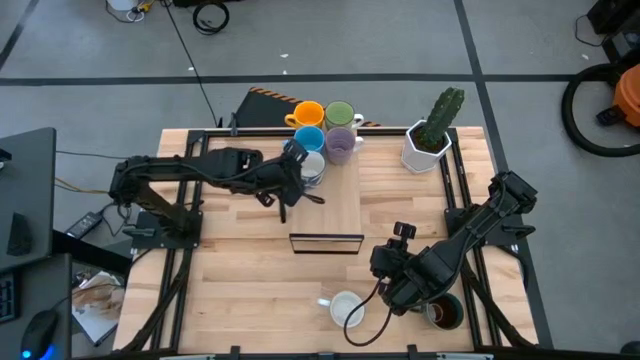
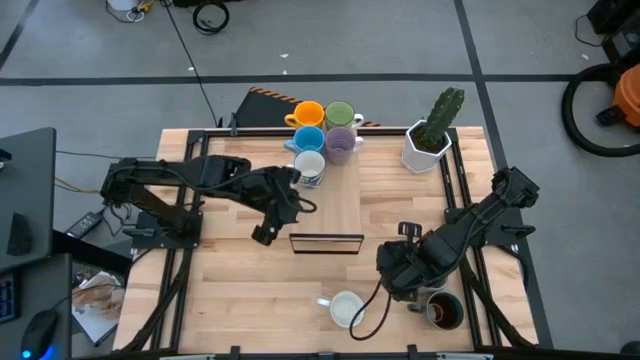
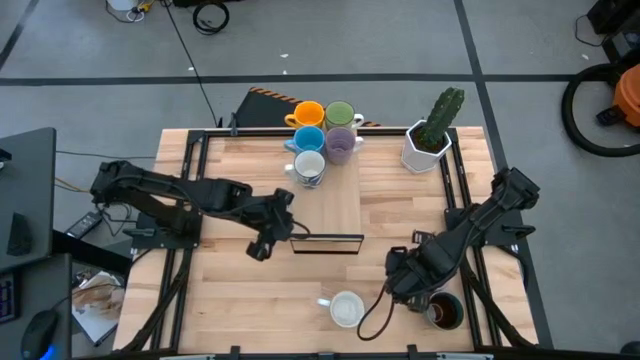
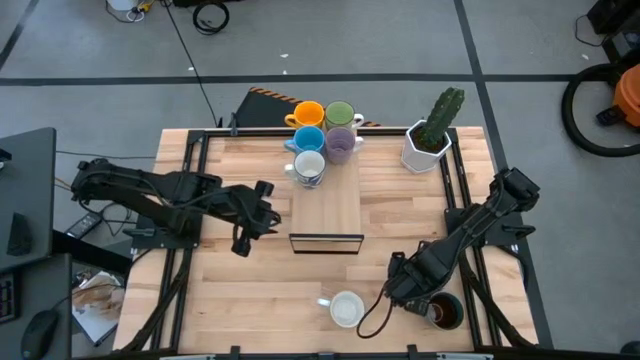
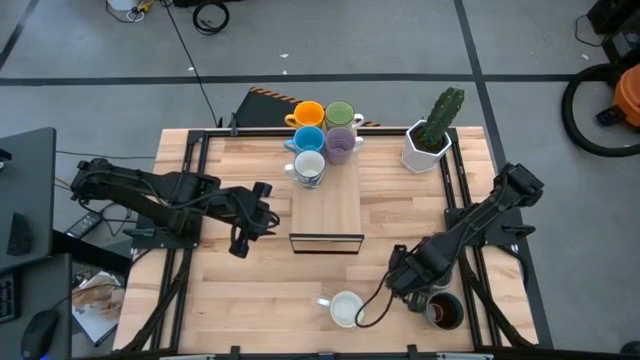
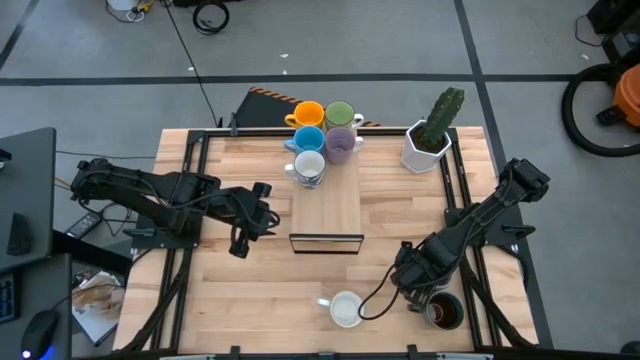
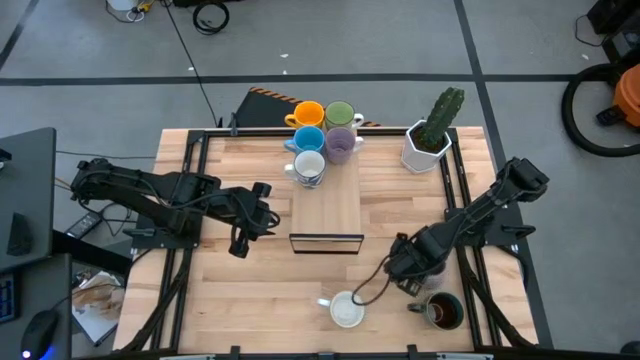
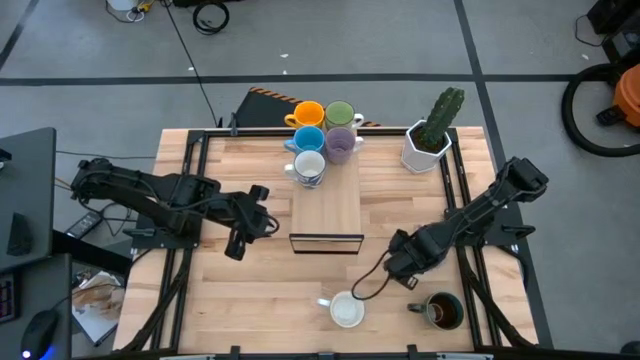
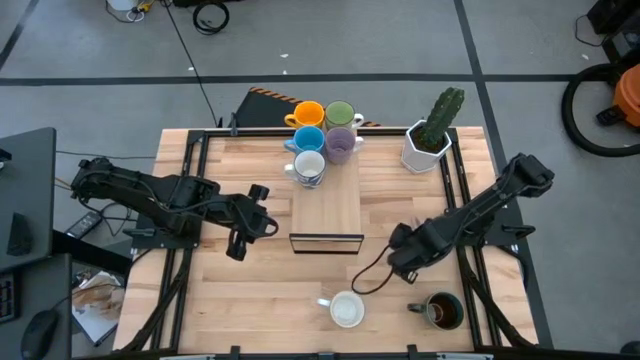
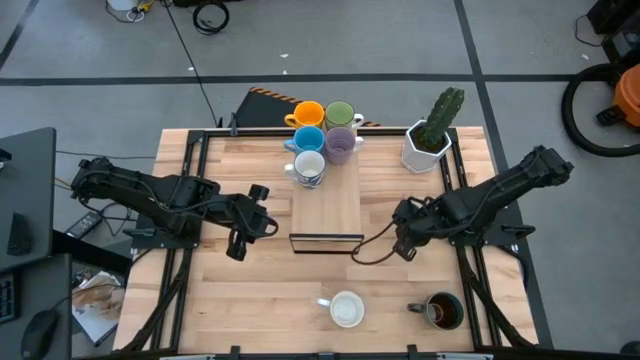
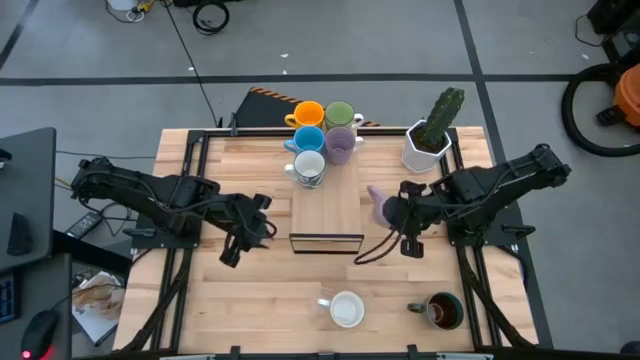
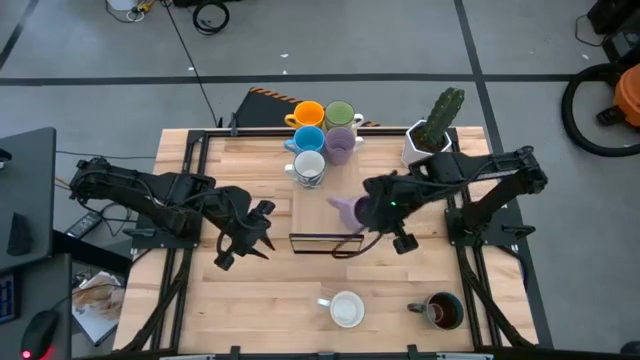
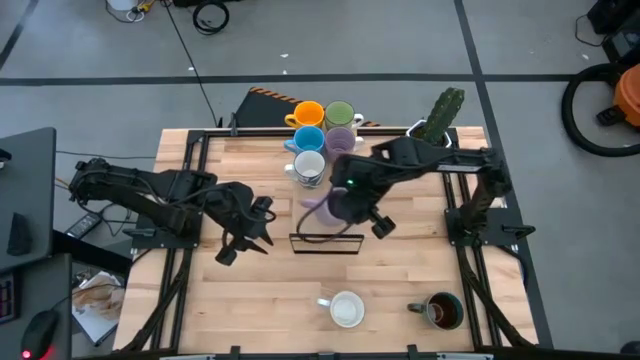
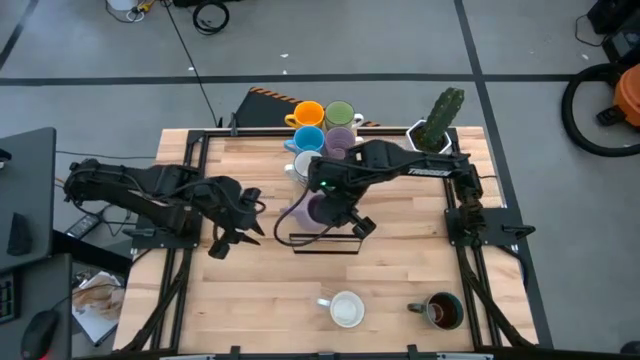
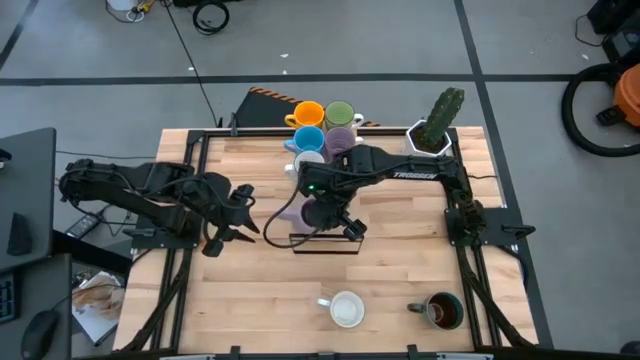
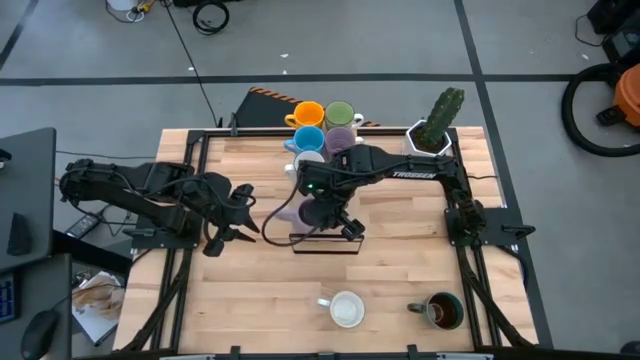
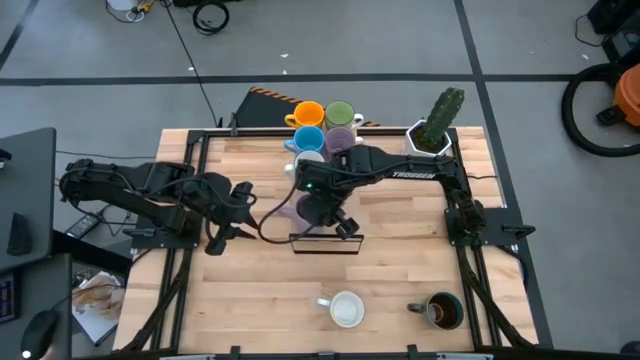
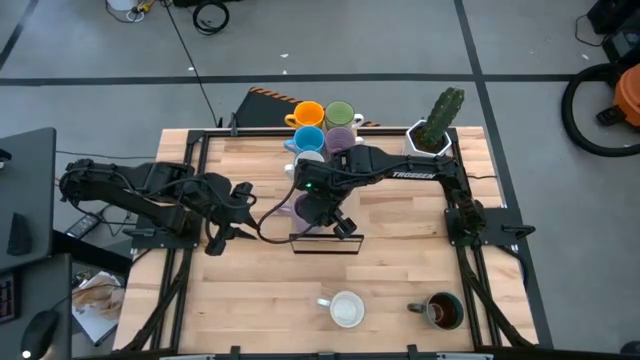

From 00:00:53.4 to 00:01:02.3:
Task: Place coffee mugs
Put the purple mug on the shelf
